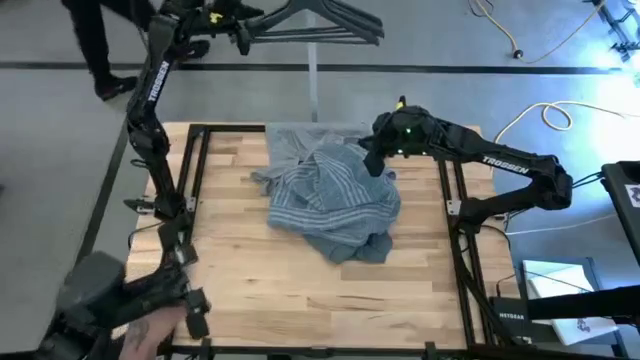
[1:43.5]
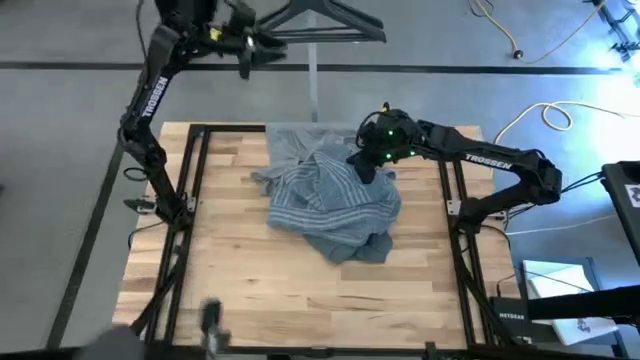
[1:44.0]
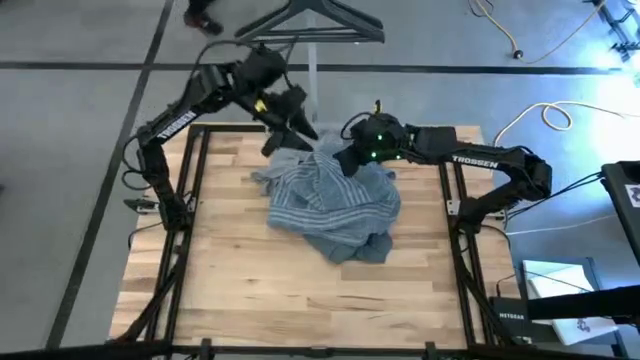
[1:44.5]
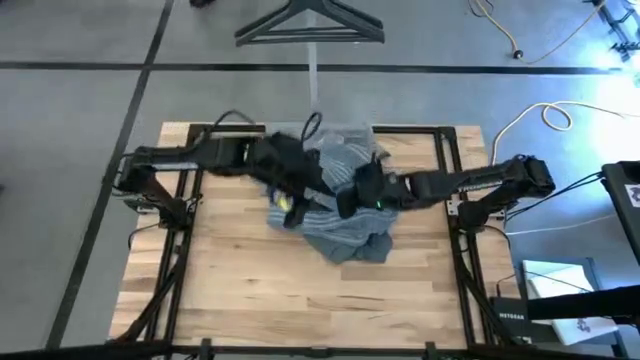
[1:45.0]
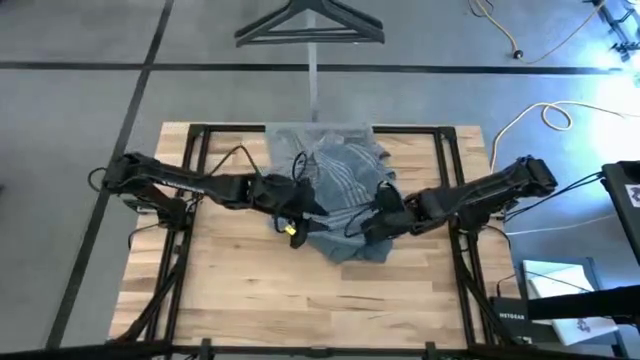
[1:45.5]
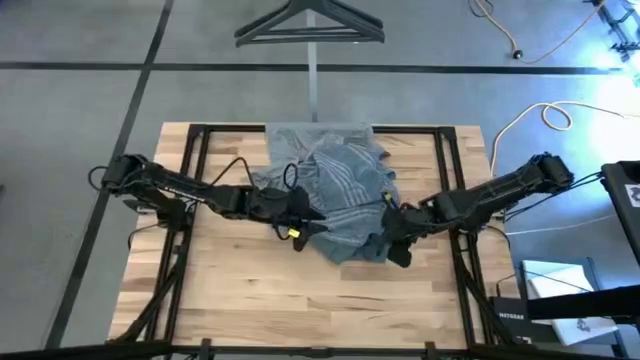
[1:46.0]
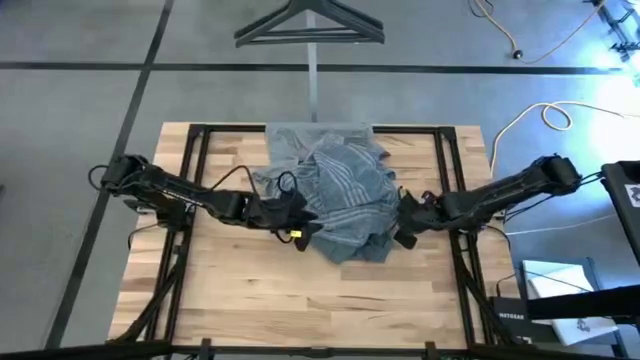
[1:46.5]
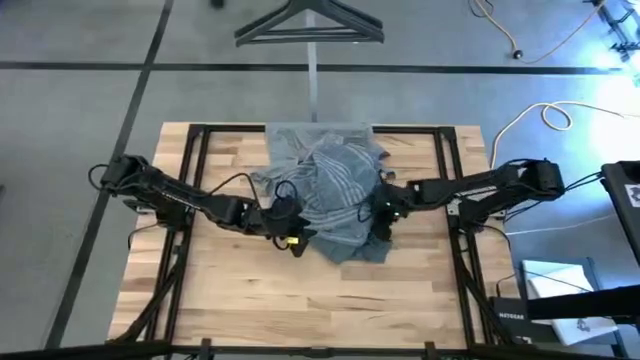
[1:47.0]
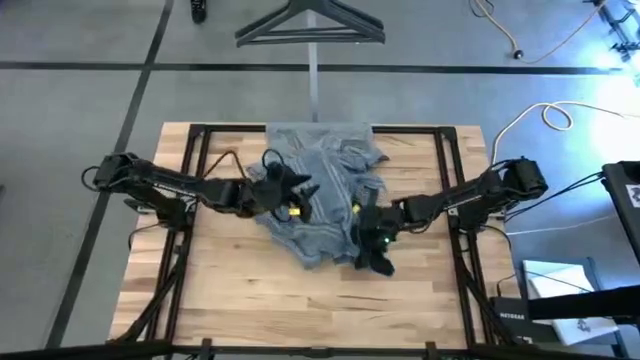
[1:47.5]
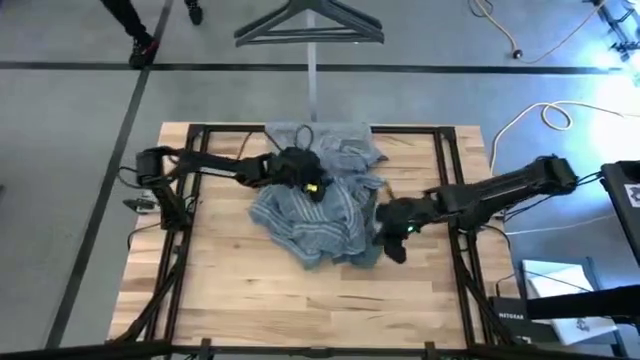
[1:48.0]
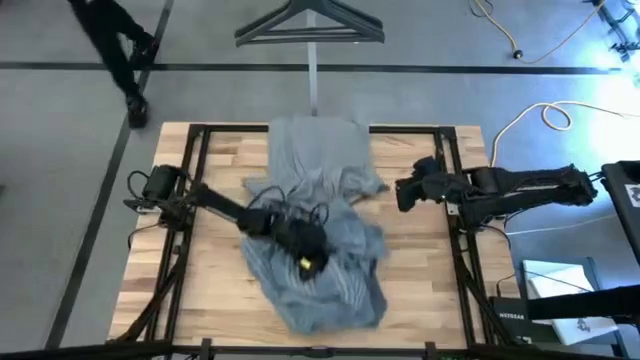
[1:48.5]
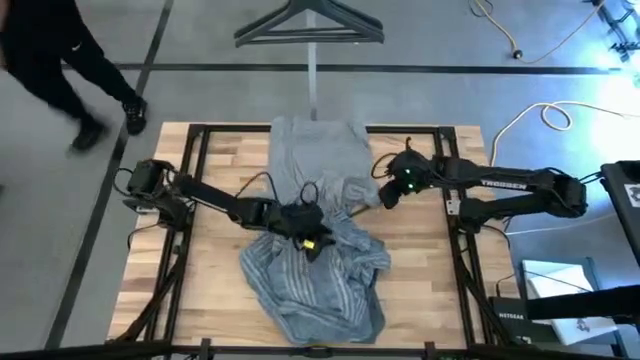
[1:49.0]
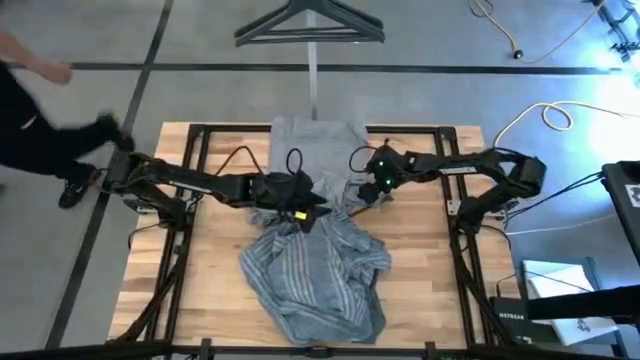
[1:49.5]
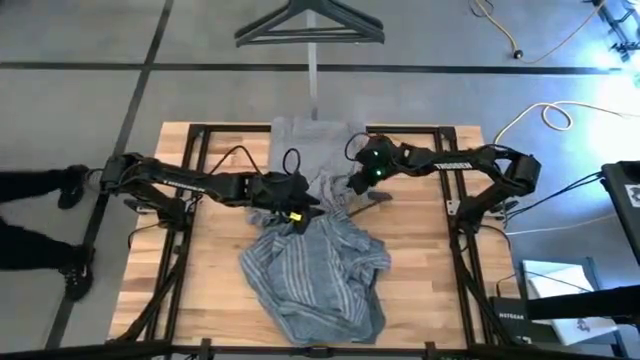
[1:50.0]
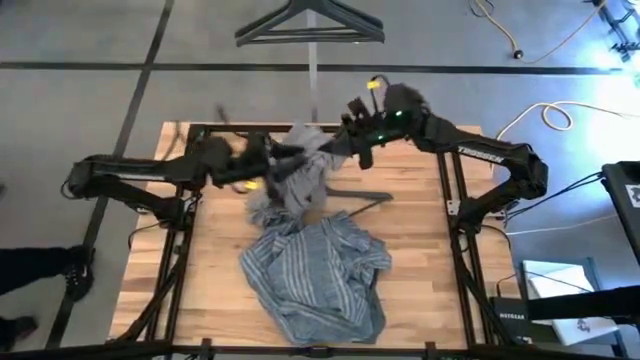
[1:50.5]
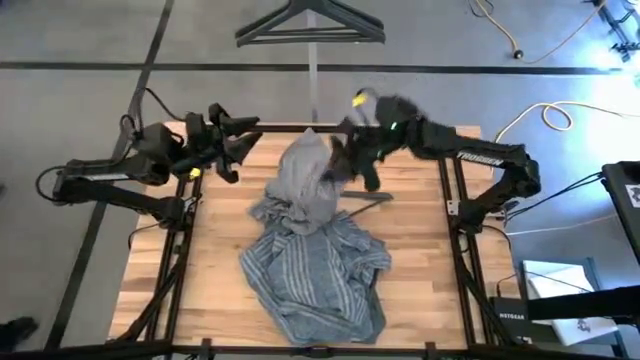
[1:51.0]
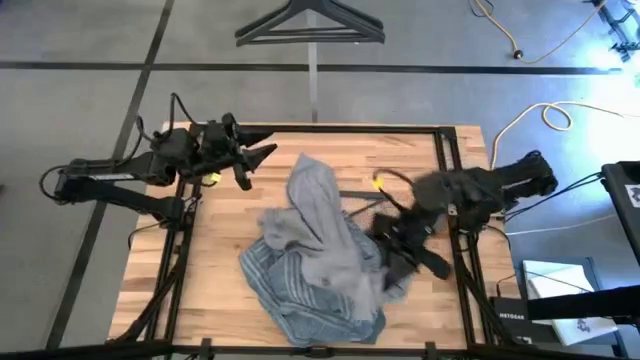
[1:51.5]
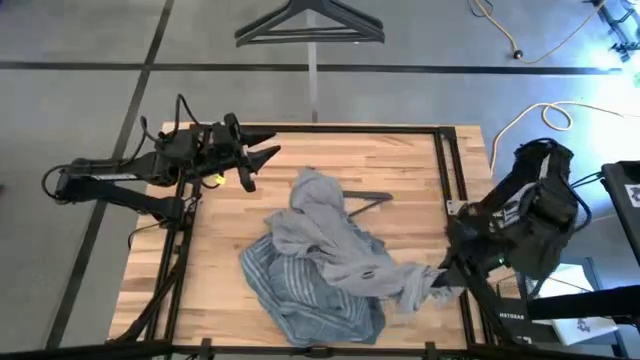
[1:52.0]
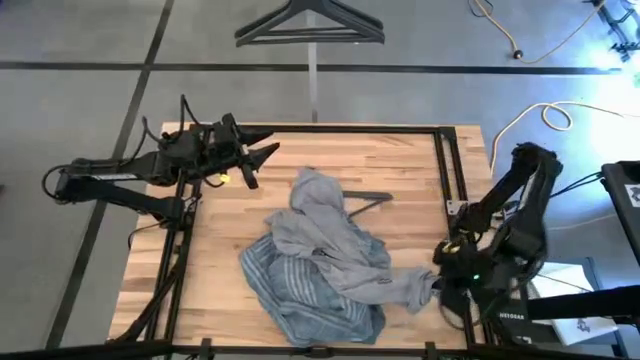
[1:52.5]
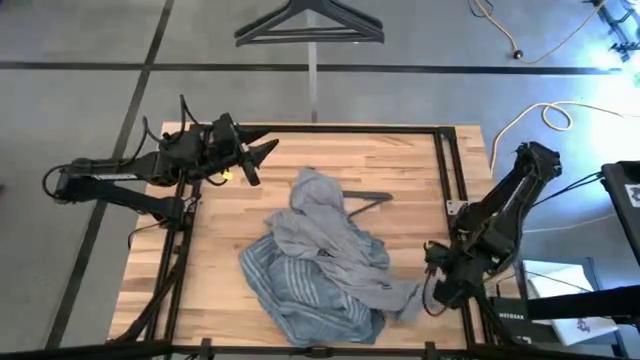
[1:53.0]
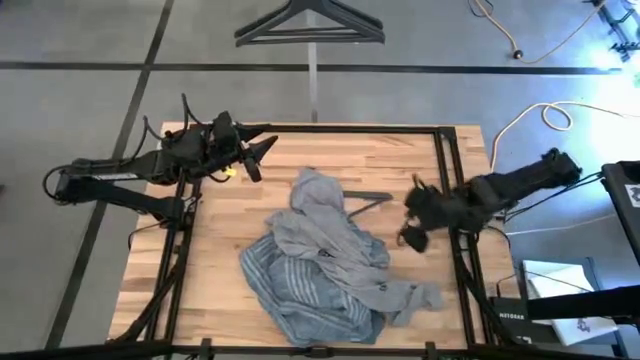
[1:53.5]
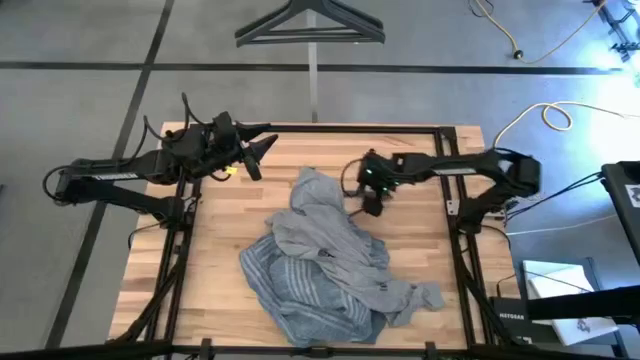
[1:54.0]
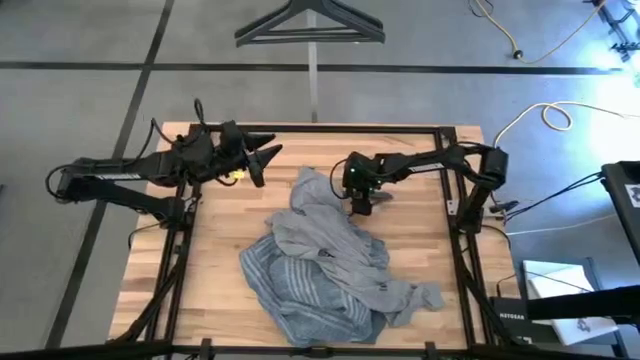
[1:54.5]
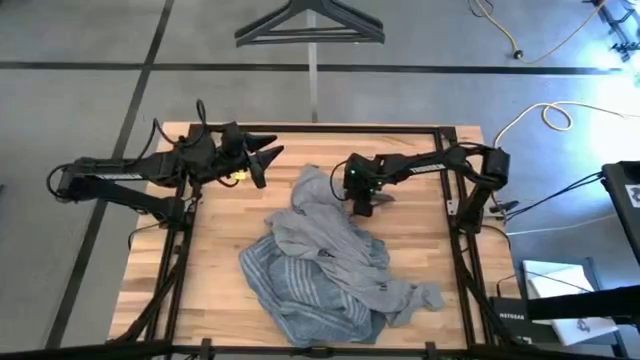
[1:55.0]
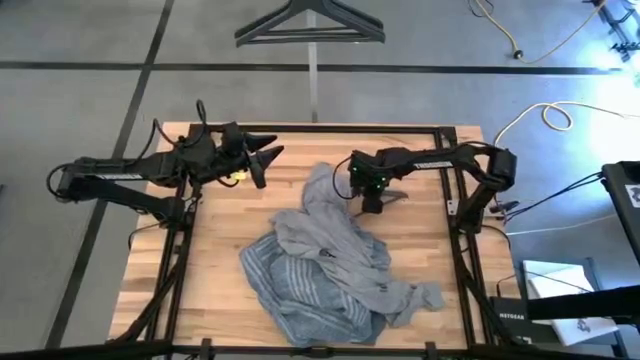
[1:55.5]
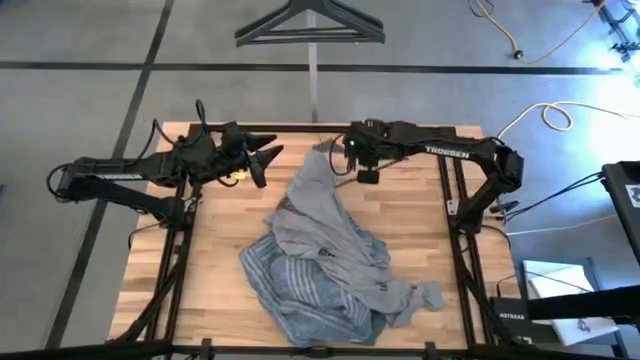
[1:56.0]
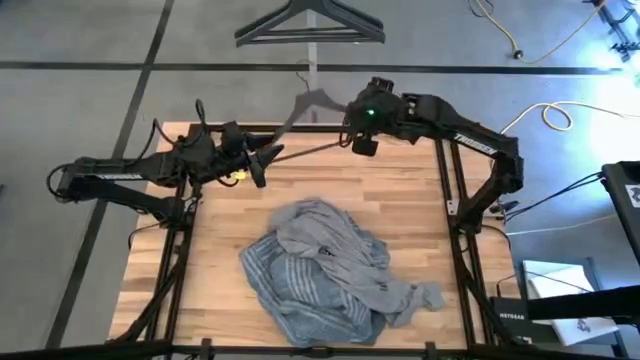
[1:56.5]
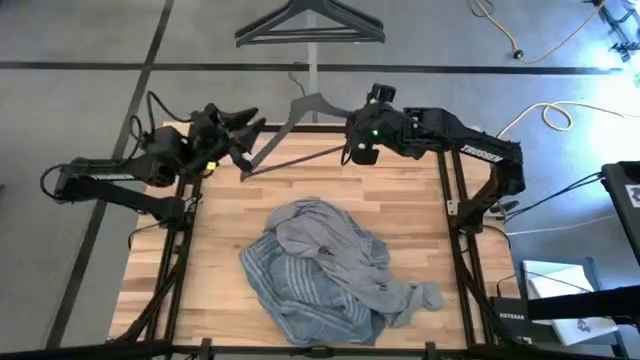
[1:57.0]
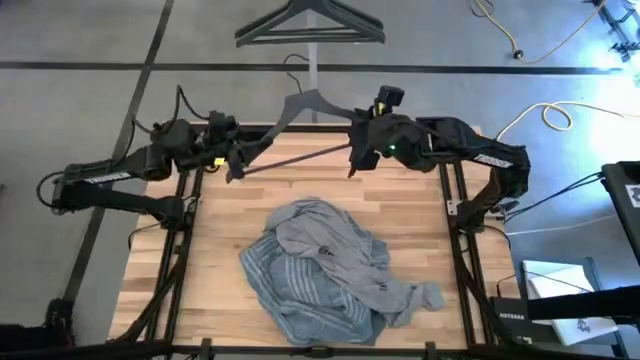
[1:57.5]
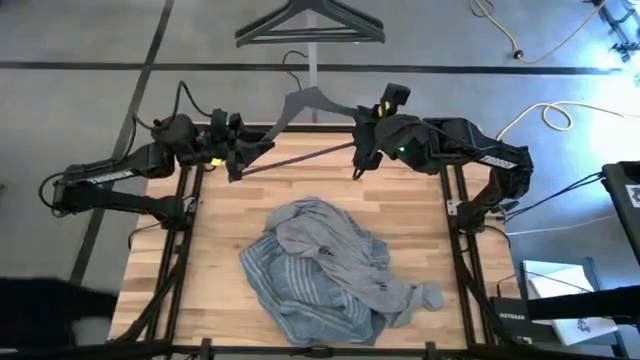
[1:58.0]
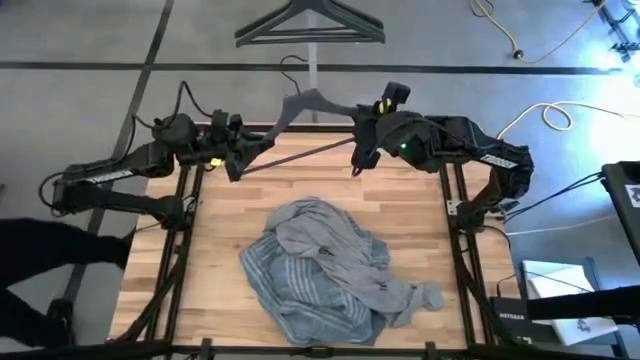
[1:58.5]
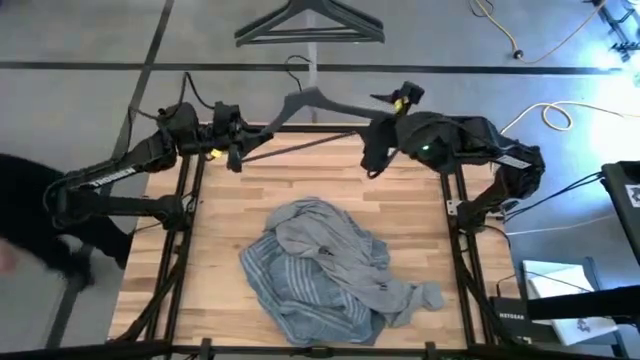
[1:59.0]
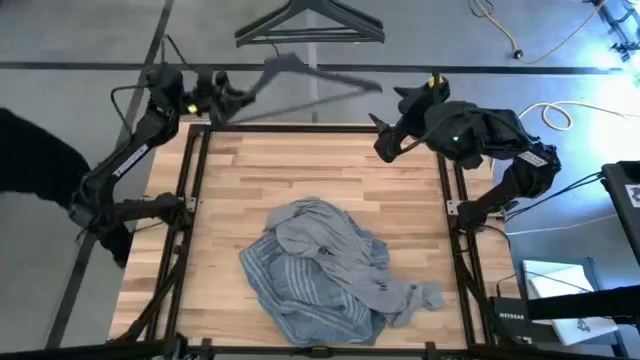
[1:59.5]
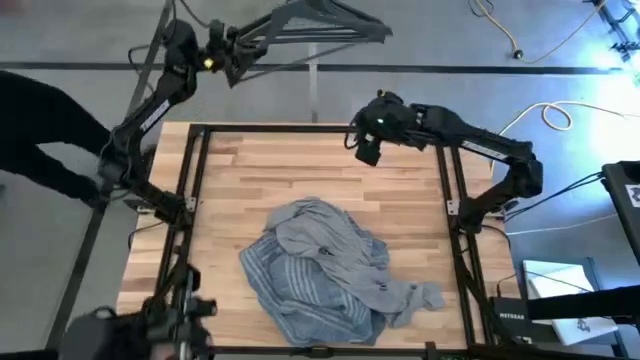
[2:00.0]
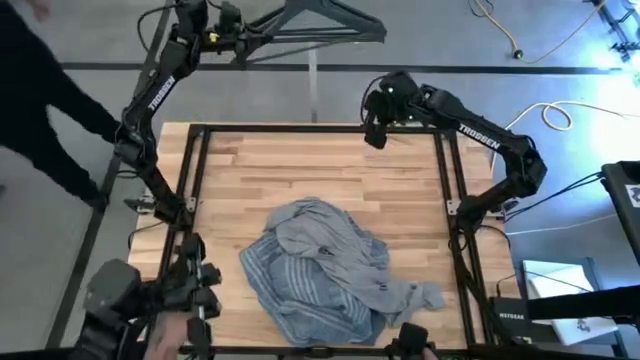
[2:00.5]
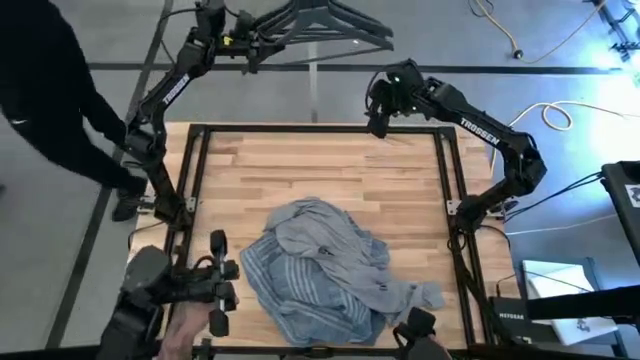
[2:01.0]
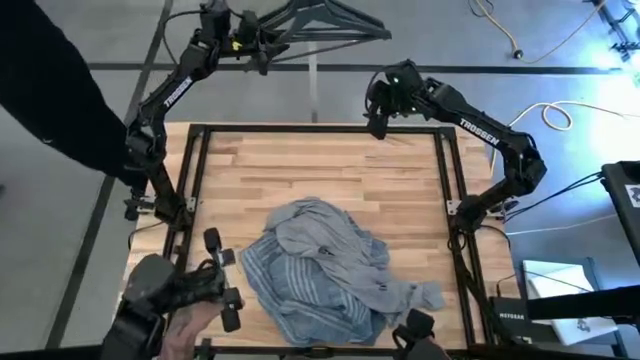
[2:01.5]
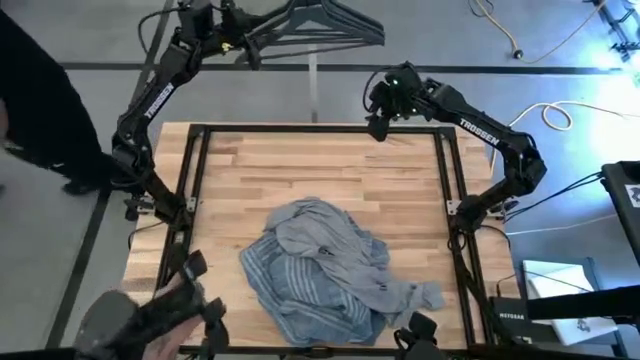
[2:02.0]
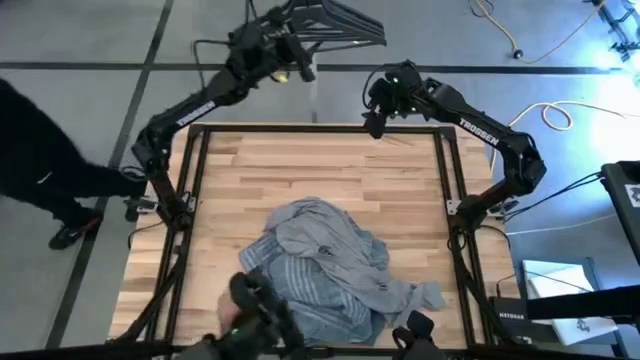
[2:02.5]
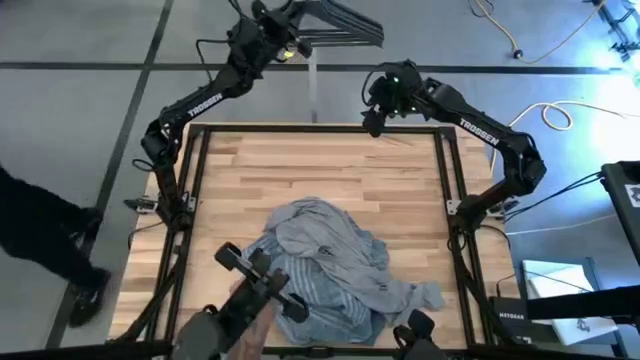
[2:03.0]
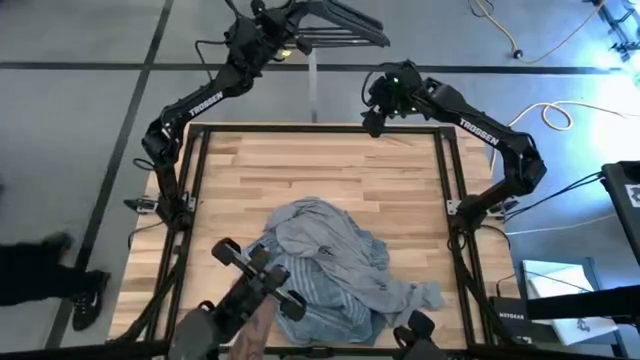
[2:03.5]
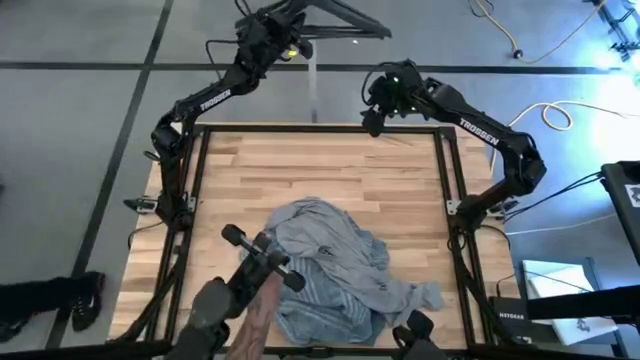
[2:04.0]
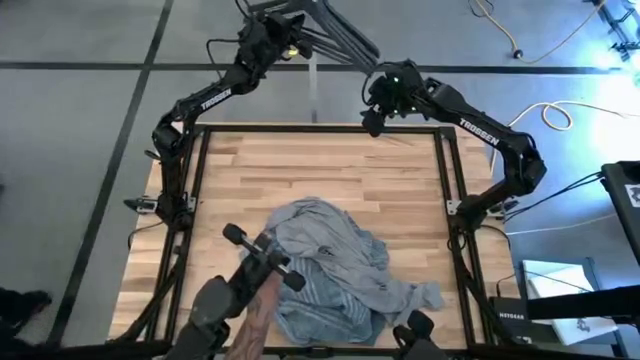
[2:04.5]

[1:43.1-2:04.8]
Task: Unhang clothes
Hang the hanger
